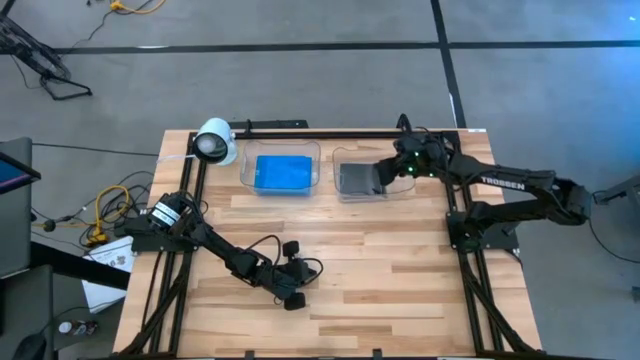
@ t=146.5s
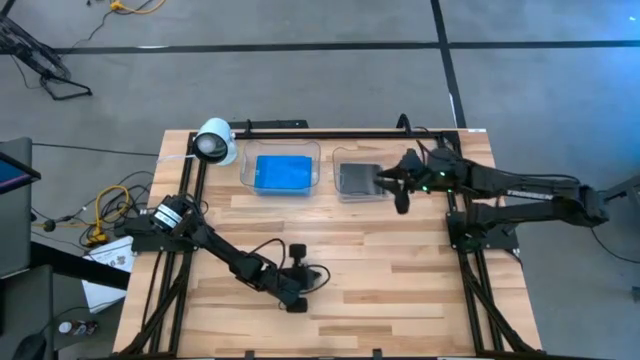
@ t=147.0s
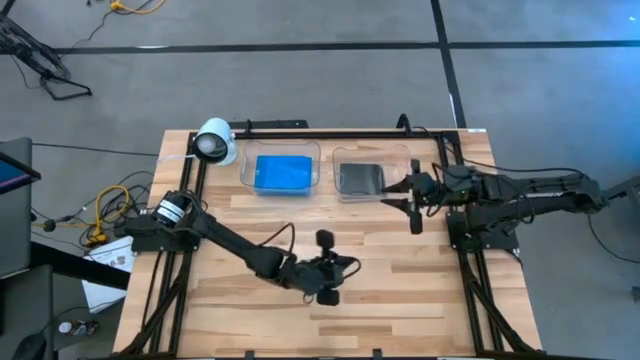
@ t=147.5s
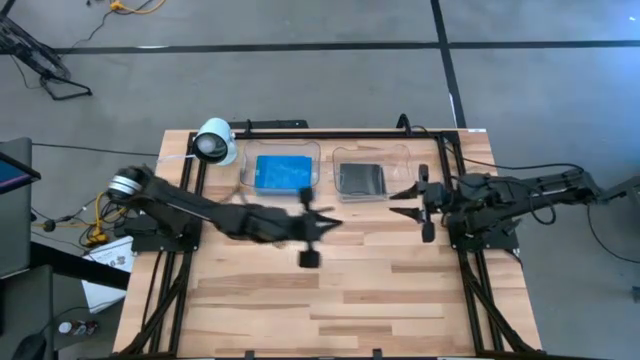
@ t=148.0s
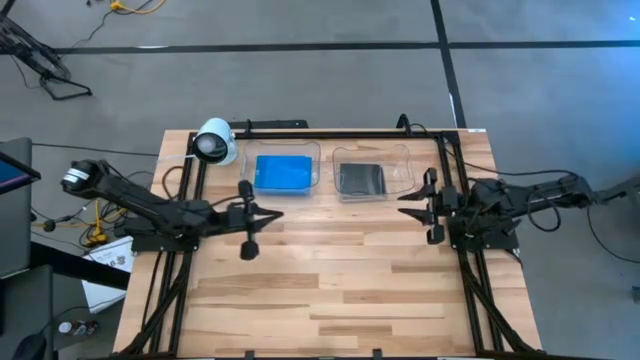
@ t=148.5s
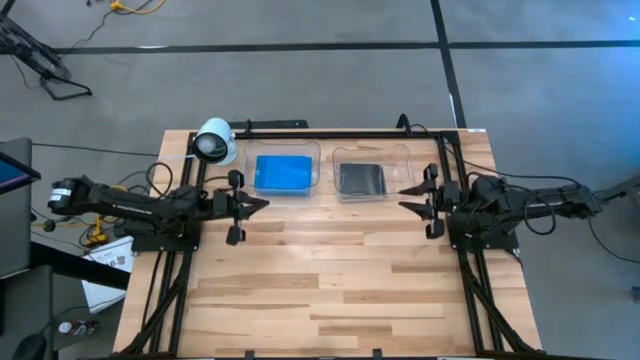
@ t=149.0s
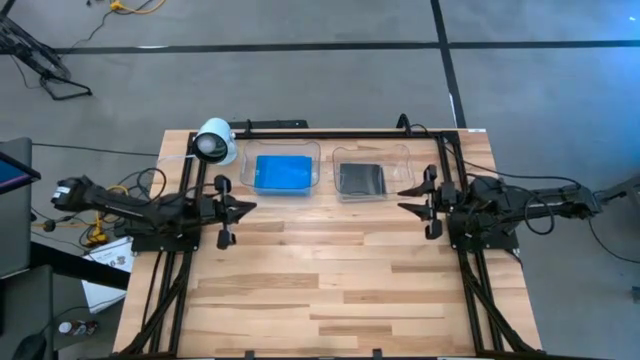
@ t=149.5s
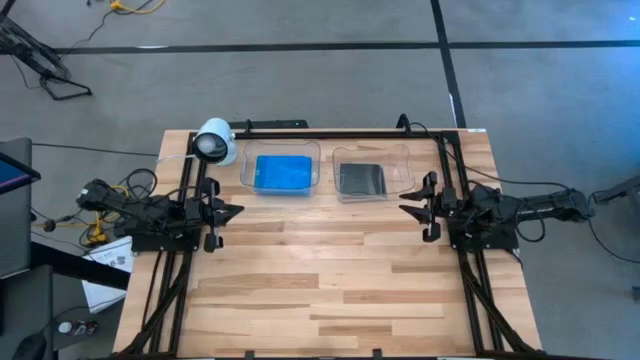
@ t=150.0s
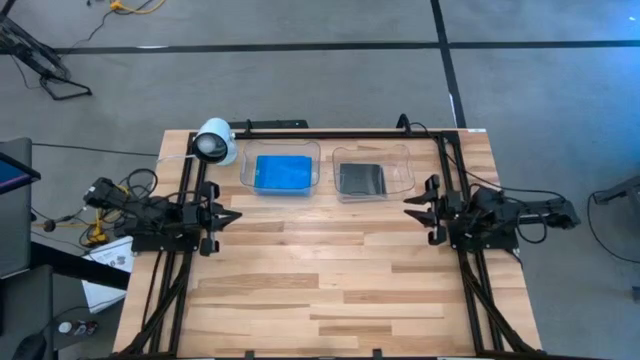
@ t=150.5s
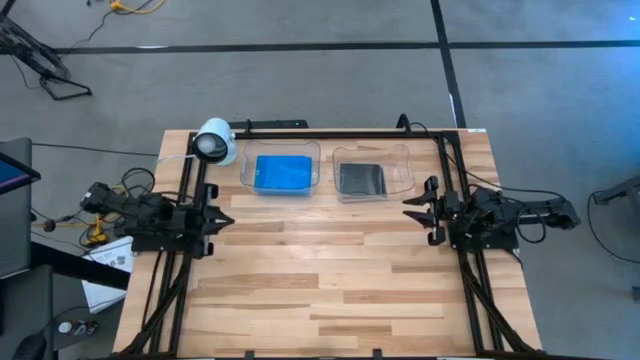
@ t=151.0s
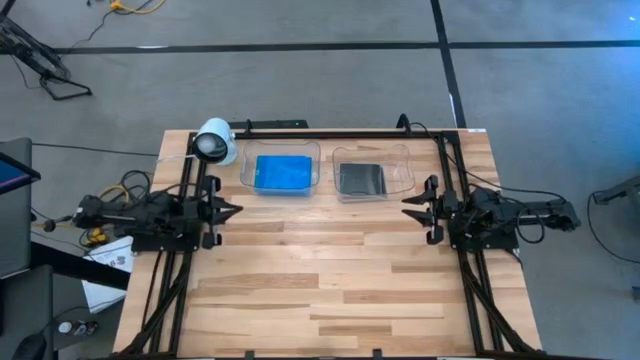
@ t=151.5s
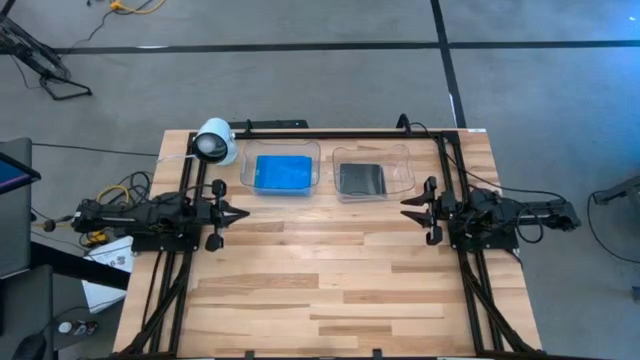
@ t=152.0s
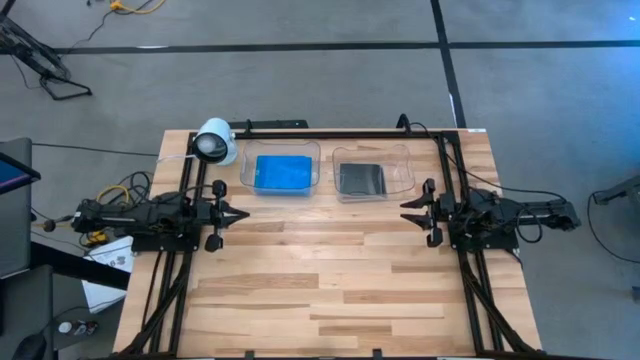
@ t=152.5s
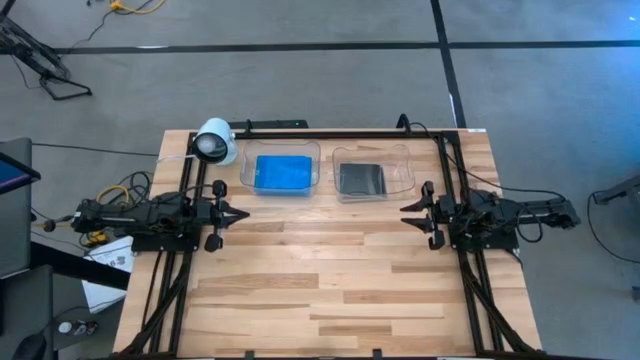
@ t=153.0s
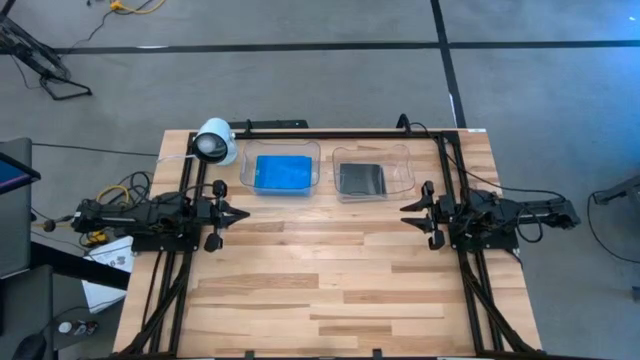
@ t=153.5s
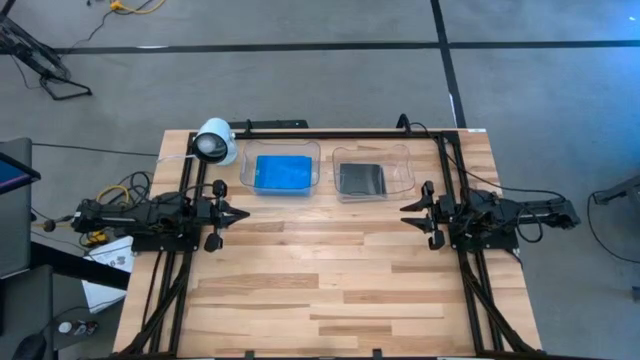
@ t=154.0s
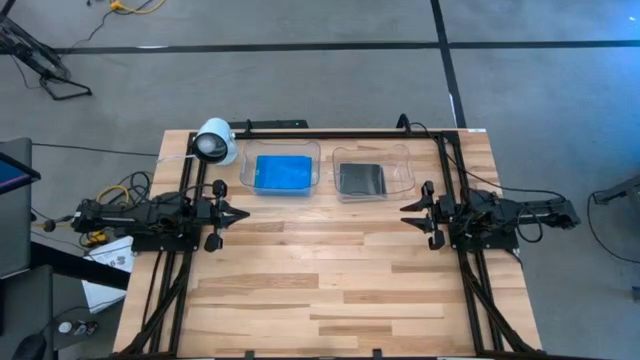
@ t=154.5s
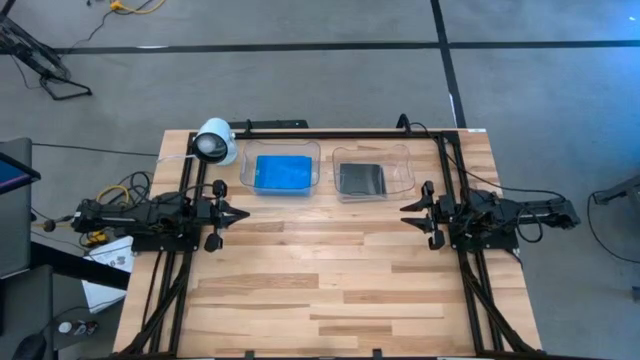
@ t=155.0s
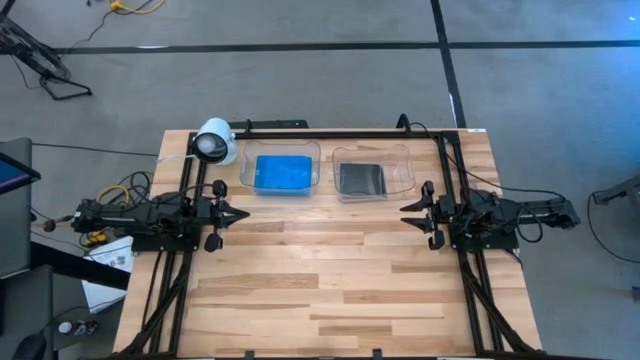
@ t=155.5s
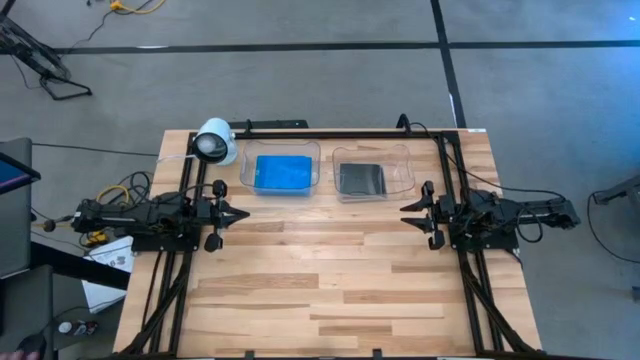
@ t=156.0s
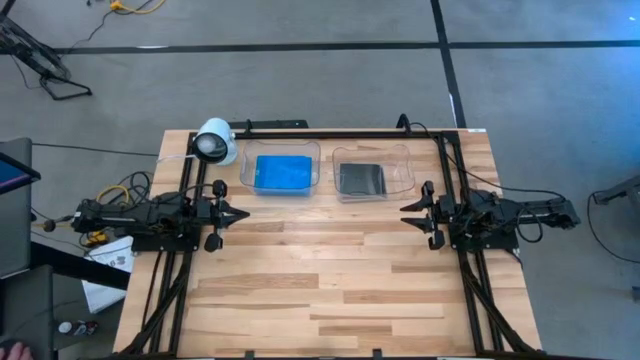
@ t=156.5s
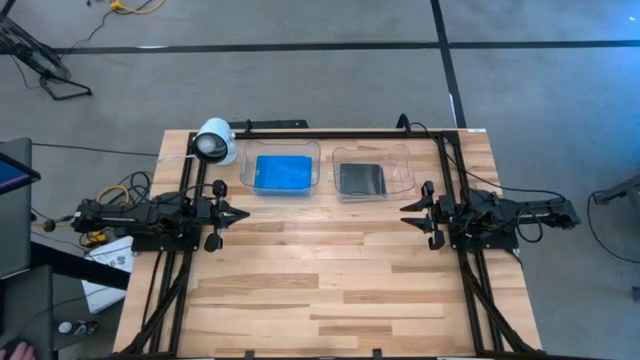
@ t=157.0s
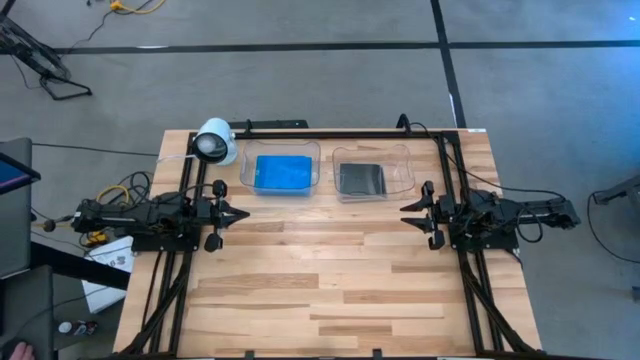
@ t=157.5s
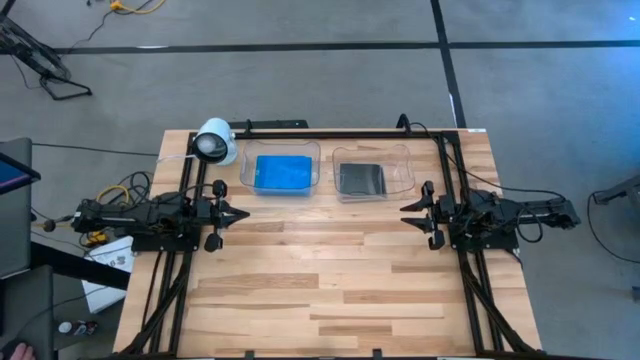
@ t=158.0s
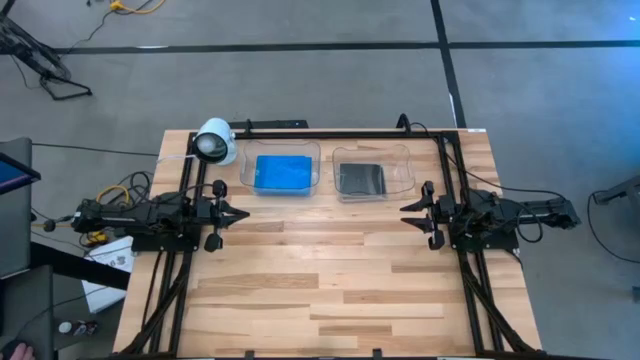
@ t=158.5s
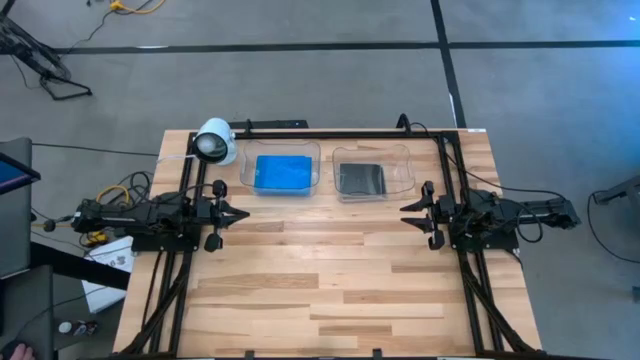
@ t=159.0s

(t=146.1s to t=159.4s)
Task: Pick & place jewel cases by type
Return to Home Position

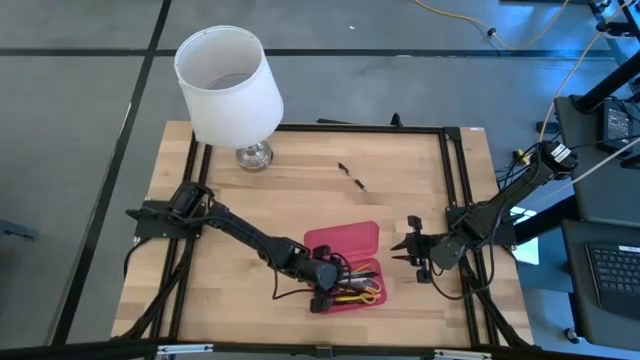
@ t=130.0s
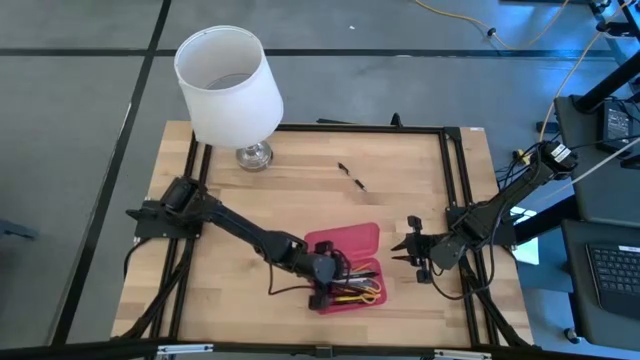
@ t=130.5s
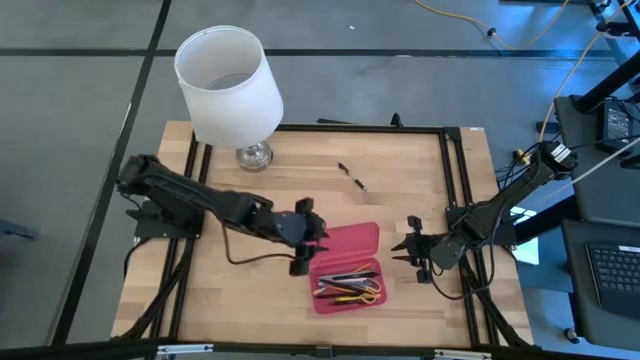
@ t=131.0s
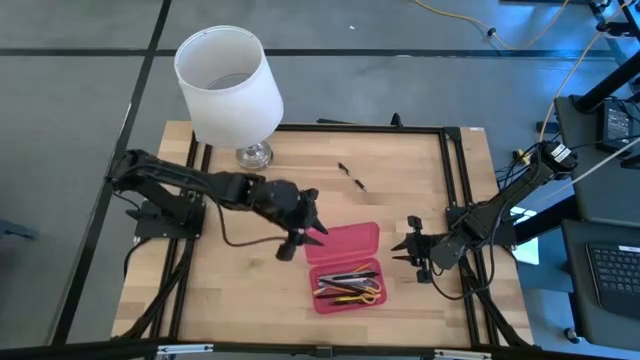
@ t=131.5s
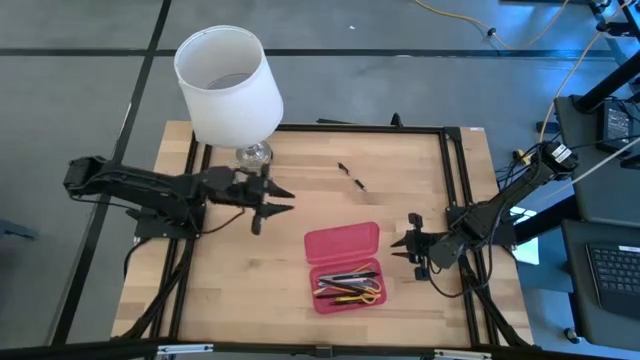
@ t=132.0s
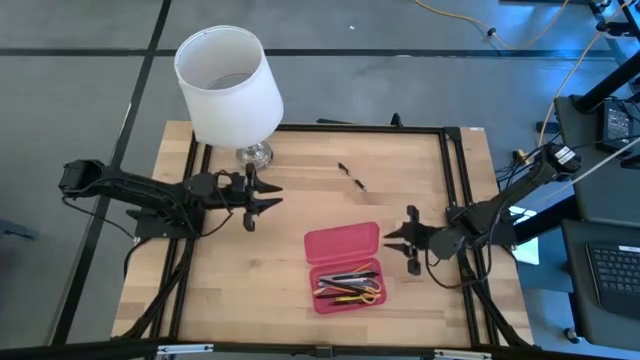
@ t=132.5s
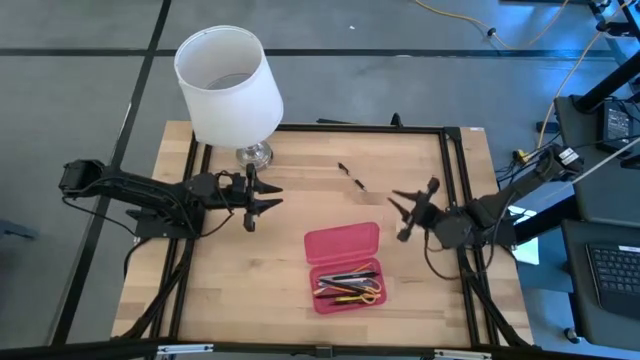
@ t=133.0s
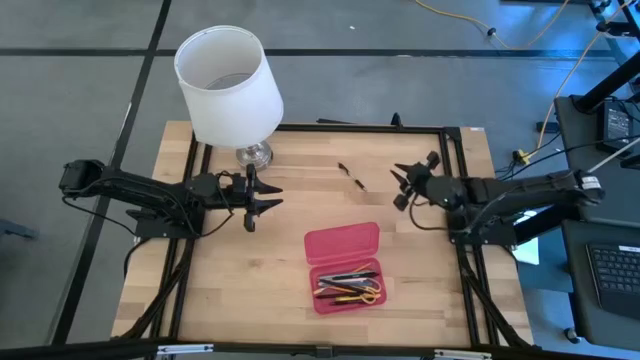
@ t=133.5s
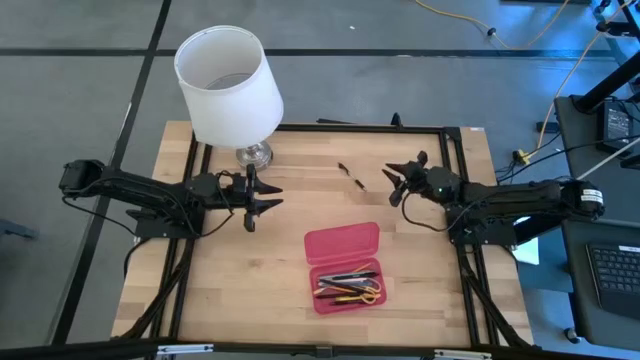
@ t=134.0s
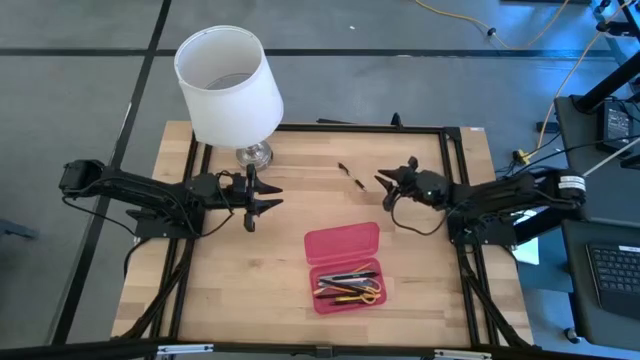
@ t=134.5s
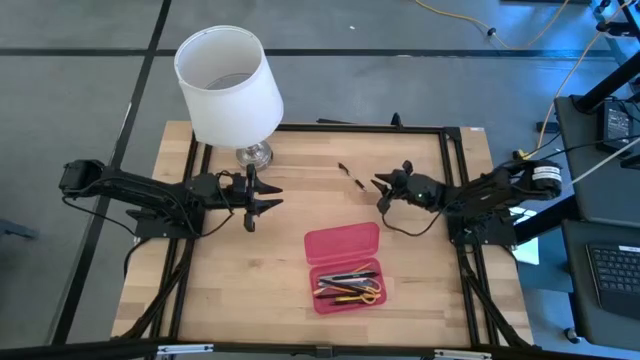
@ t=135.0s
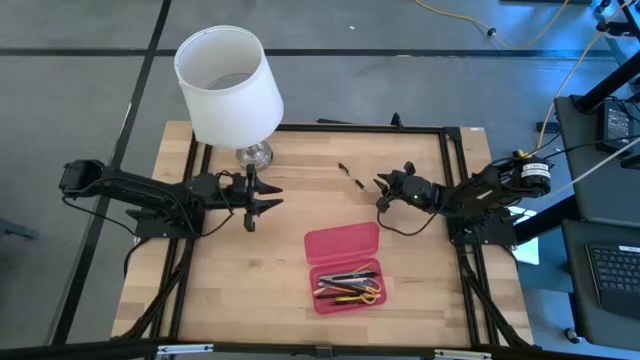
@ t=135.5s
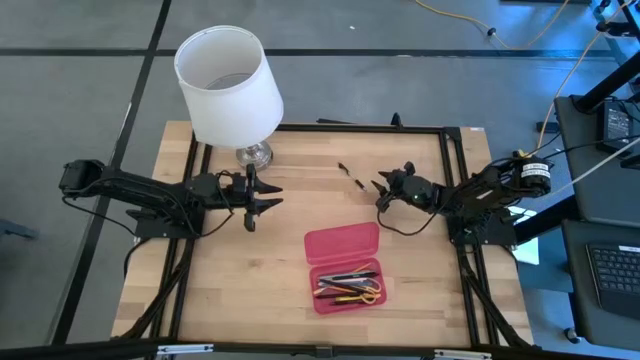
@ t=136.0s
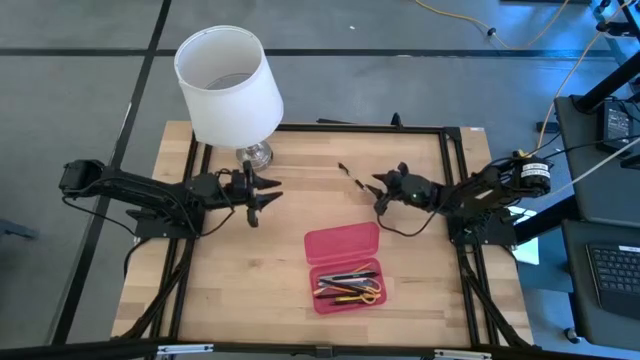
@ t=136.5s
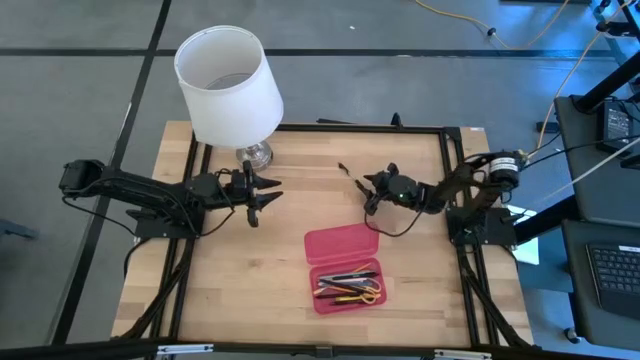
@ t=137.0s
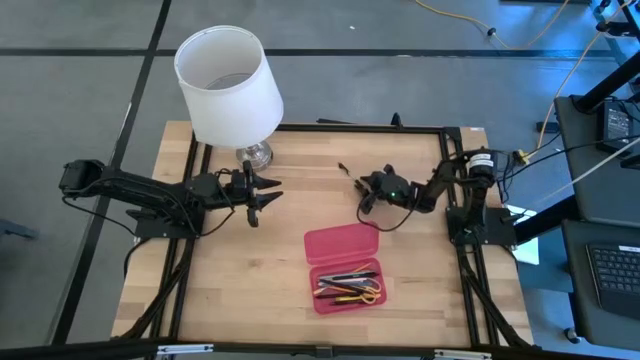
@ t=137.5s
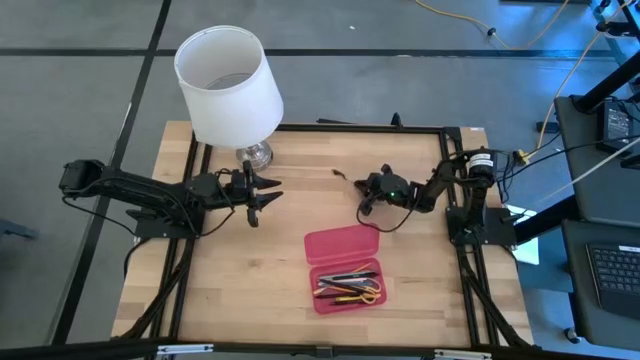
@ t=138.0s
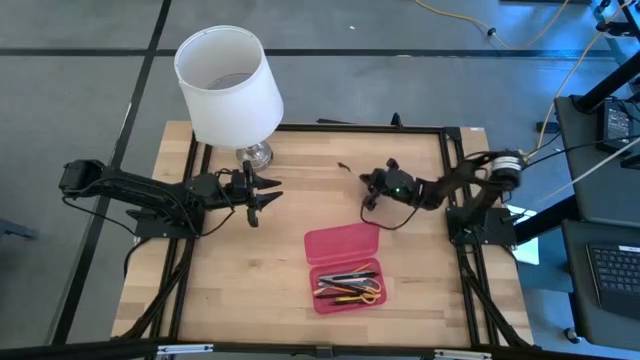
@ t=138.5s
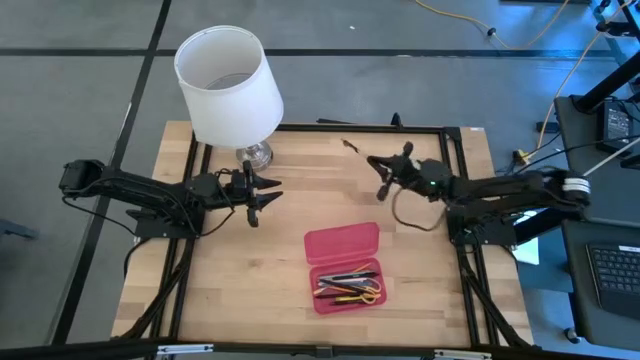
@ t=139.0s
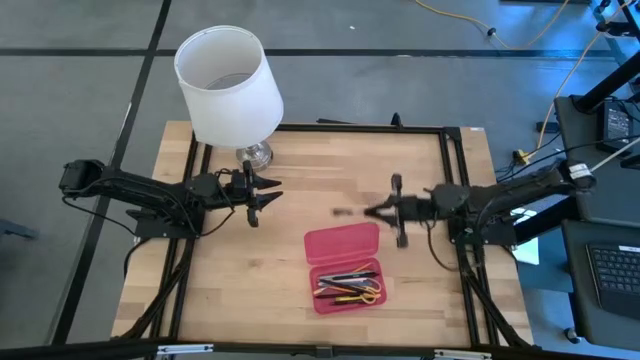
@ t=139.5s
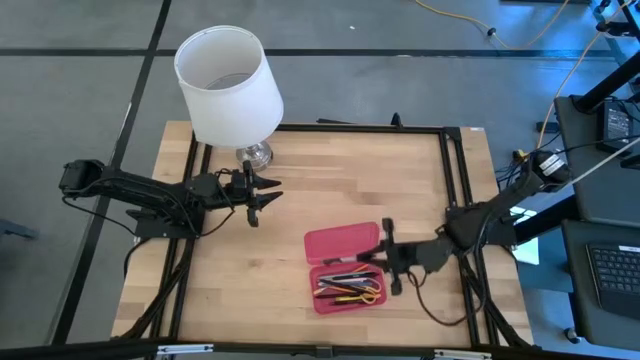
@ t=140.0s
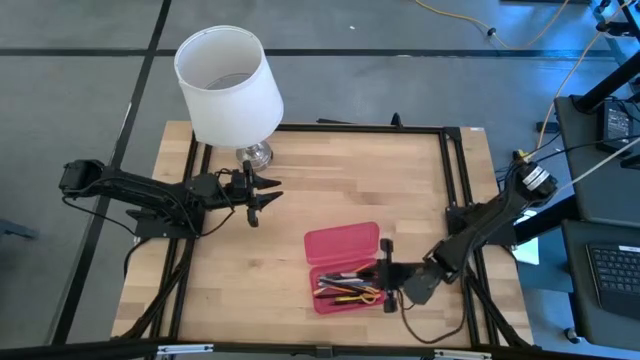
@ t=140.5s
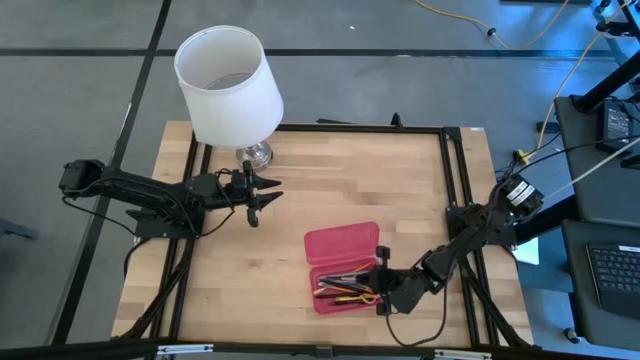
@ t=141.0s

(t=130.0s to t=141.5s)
Task: Pick & place school supplies into a supply box
Put the transparent pen into the pink supply box
